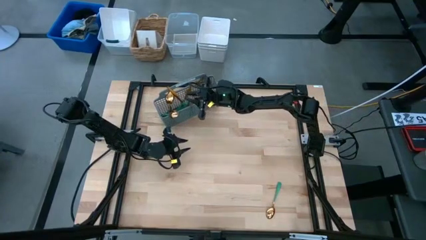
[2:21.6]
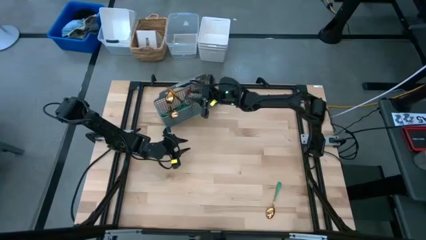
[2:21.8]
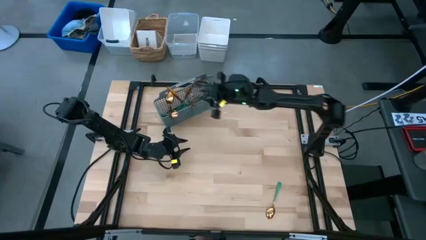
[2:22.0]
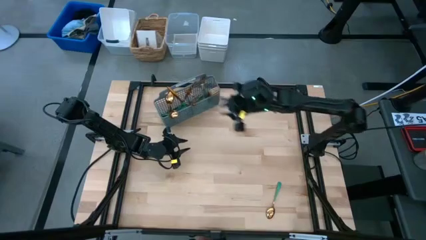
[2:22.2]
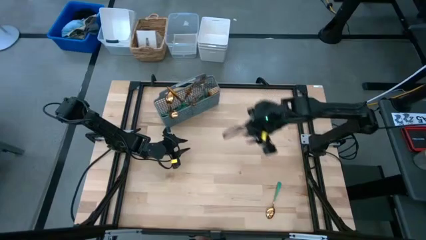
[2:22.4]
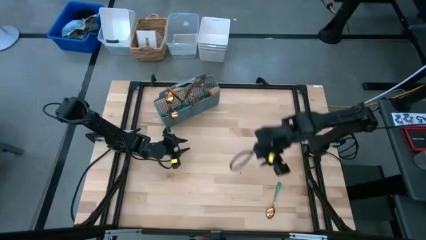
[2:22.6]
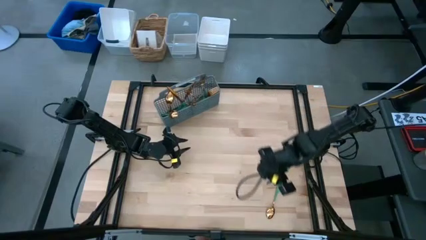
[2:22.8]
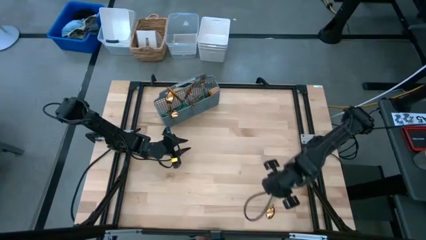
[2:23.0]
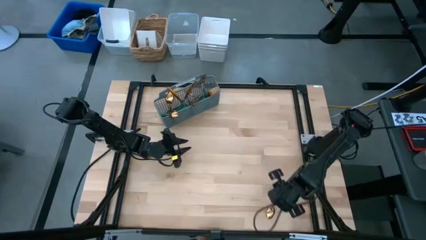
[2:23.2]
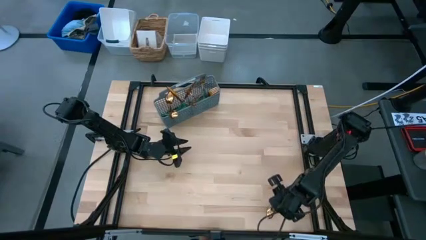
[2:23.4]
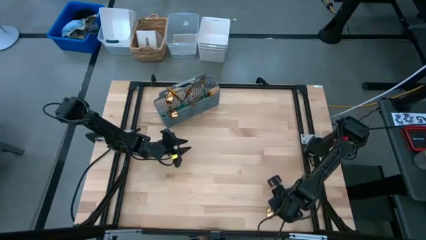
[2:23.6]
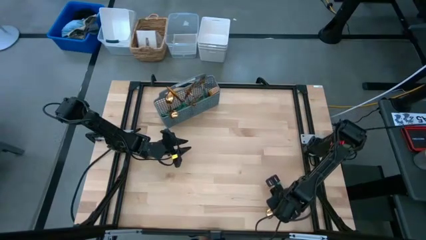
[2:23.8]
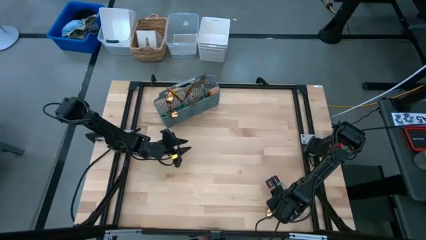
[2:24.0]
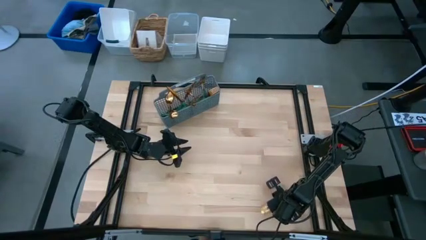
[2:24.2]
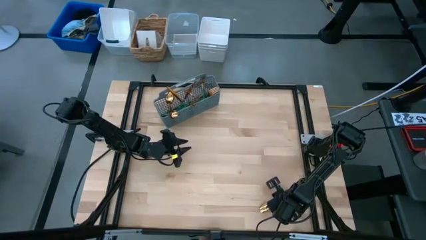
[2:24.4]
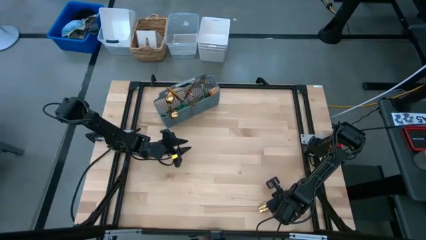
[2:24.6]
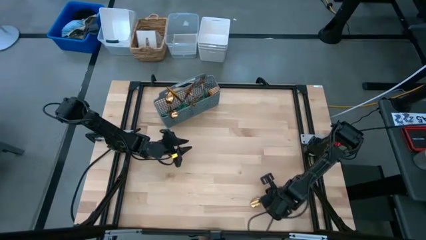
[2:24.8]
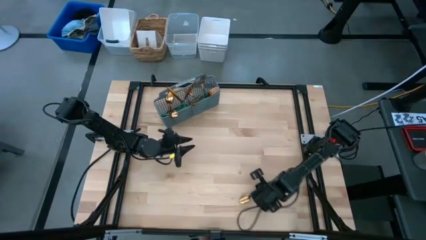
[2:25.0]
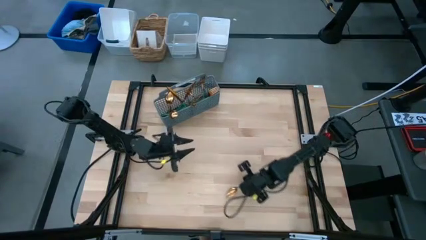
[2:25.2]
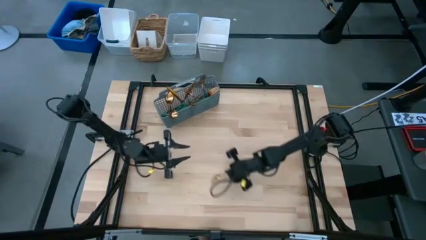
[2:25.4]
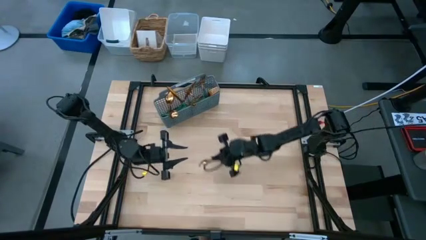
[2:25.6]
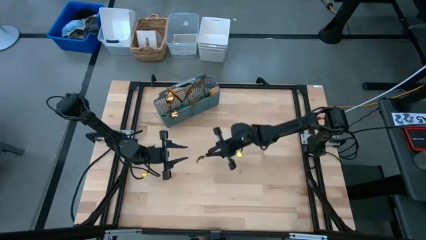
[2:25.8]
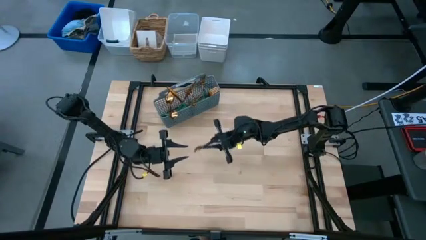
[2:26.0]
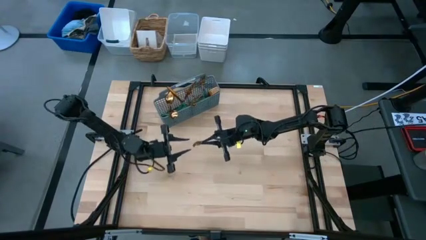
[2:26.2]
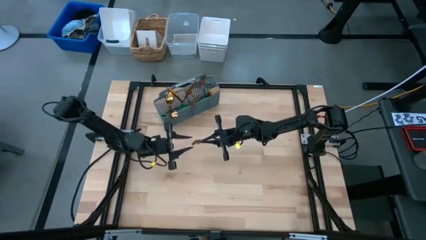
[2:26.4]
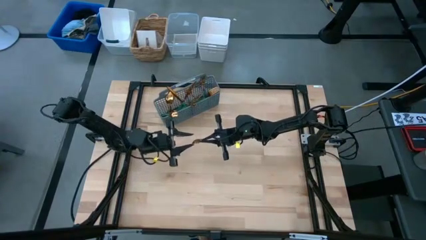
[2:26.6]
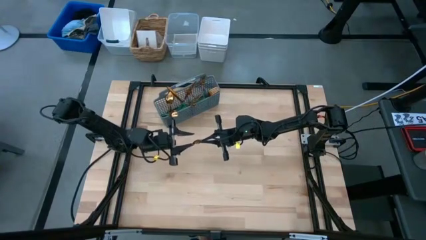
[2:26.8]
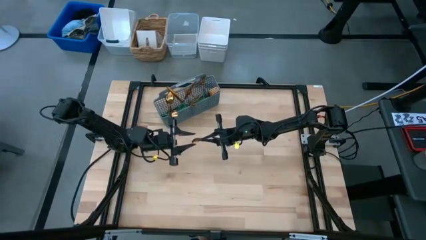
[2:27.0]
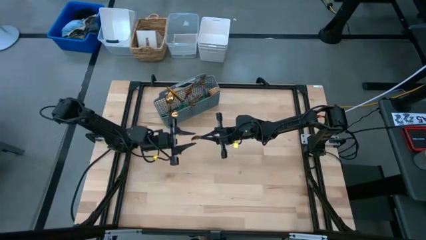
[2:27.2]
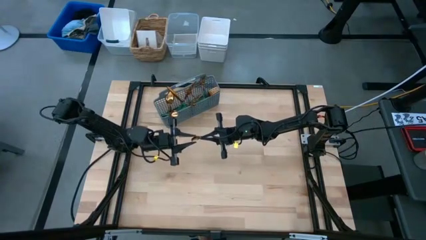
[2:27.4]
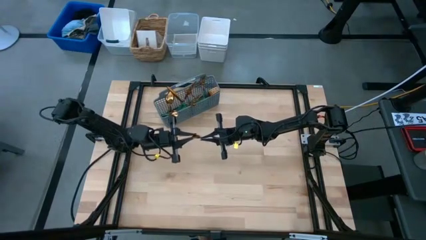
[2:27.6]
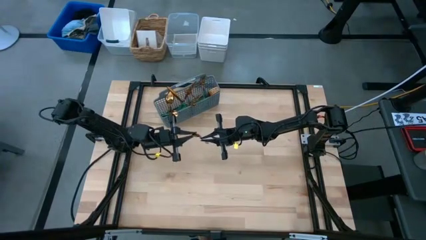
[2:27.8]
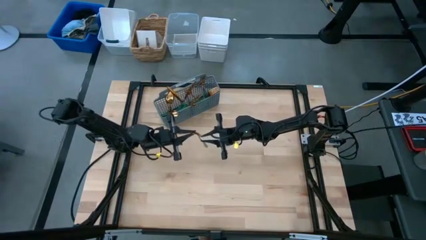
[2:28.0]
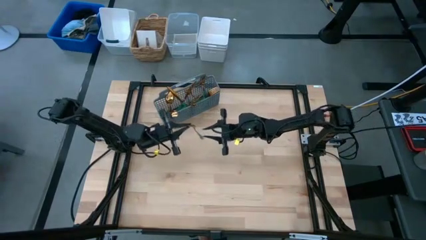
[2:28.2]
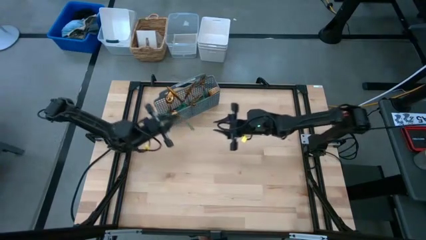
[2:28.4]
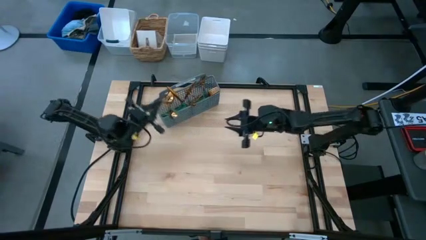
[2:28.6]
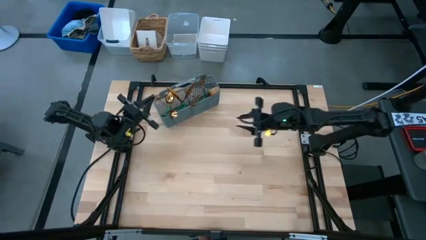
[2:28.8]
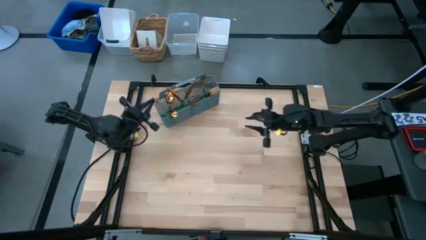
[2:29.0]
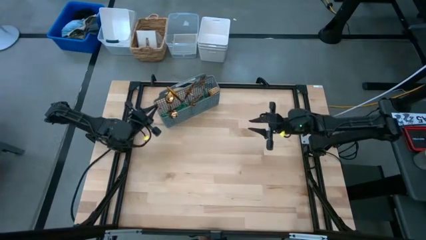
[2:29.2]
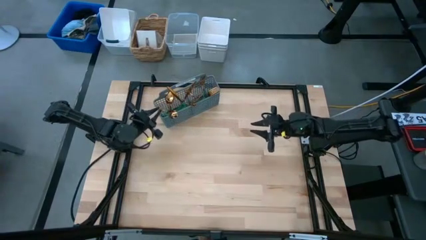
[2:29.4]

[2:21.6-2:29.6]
Task: Sort silverware
Put the spoon into the left section of the silverware holder

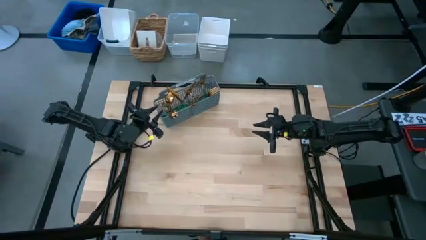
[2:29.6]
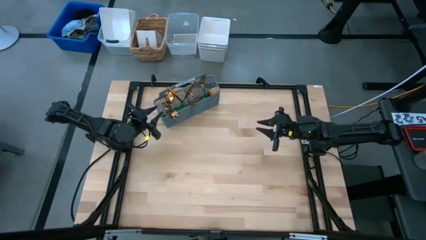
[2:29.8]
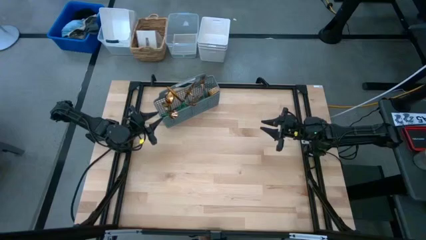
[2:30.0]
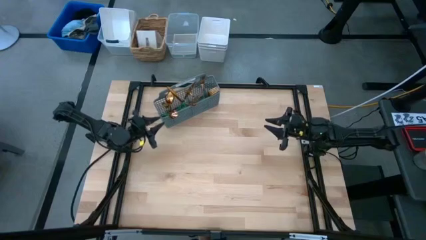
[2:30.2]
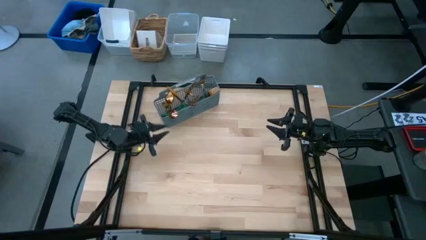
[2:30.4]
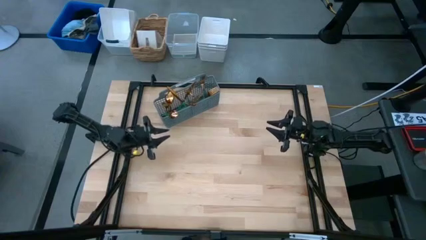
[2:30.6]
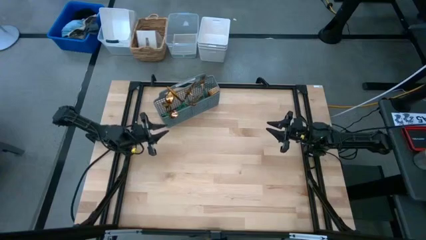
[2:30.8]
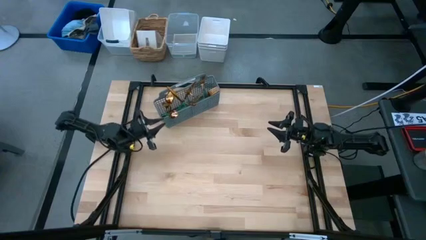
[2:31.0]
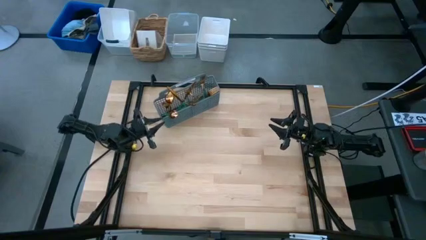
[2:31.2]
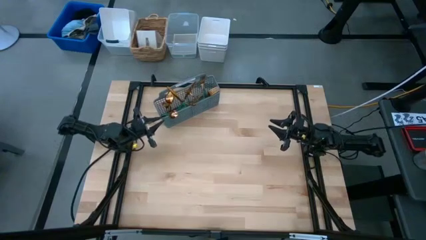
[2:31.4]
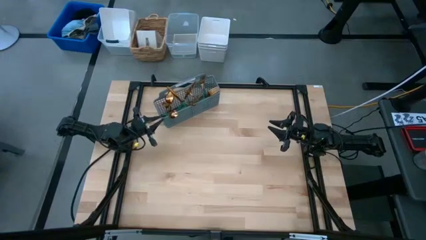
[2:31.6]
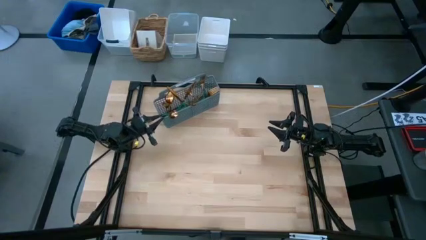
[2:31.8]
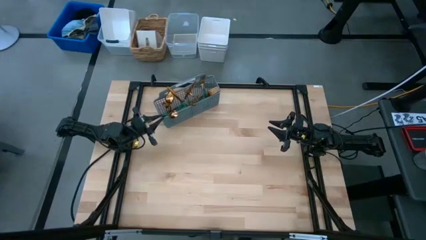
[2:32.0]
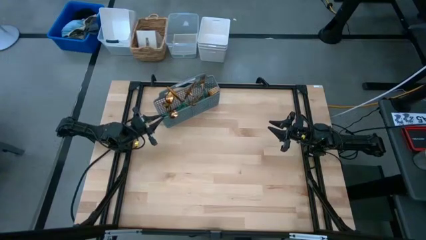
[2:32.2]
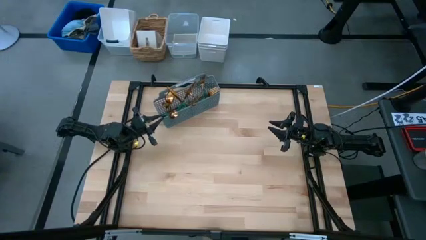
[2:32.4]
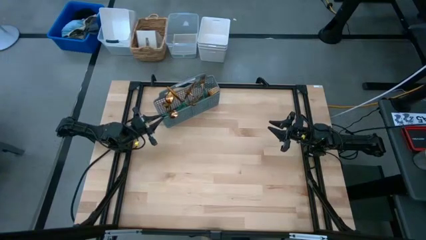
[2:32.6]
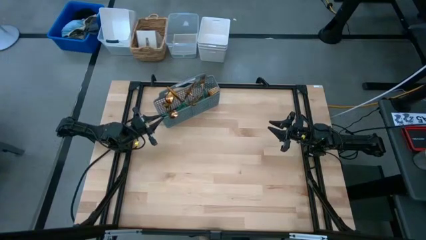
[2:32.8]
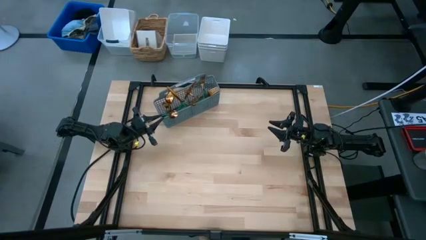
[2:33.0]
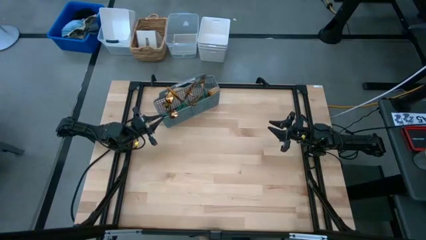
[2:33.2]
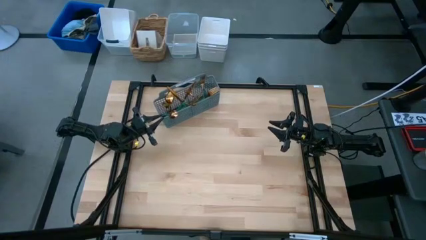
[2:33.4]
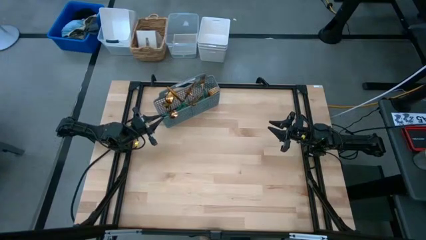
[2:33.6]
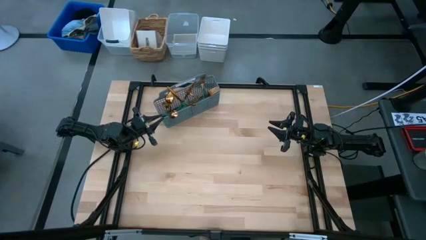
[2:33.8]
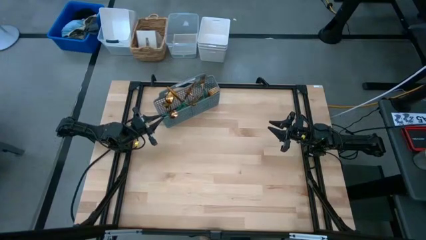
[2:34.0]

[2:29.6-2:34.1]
Return to Home Position

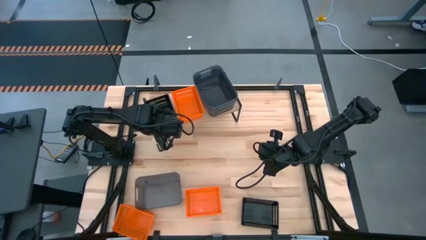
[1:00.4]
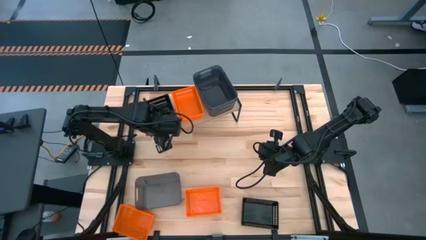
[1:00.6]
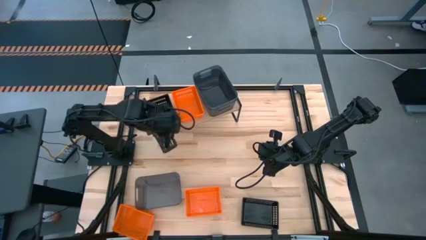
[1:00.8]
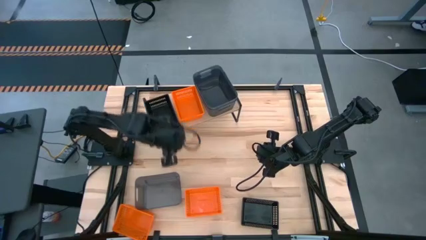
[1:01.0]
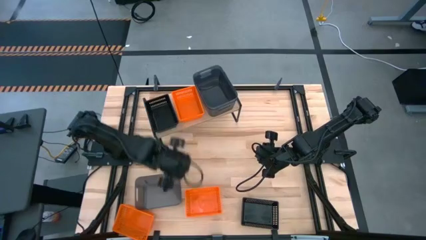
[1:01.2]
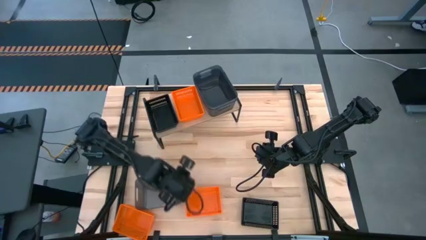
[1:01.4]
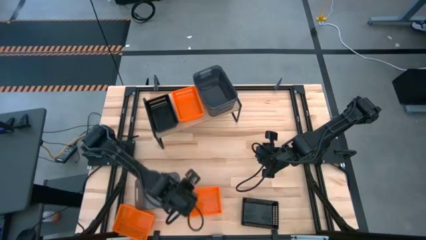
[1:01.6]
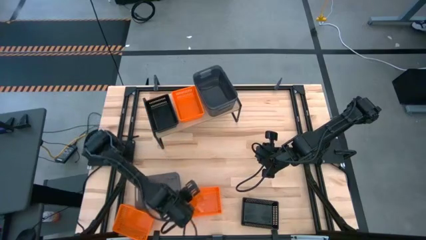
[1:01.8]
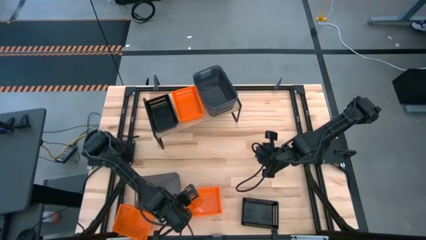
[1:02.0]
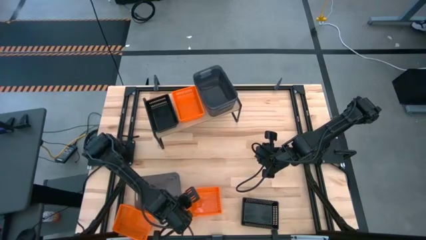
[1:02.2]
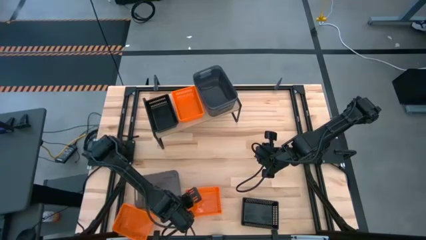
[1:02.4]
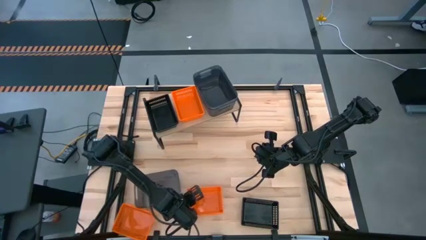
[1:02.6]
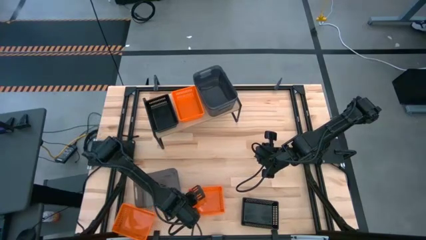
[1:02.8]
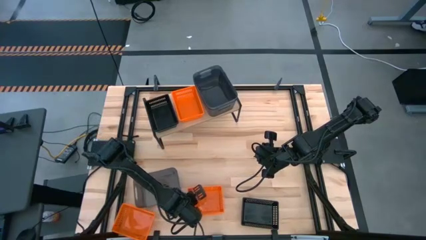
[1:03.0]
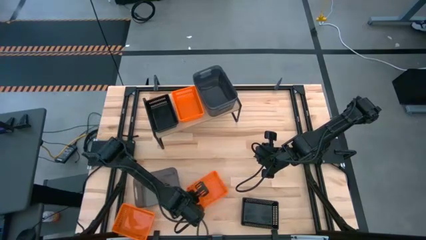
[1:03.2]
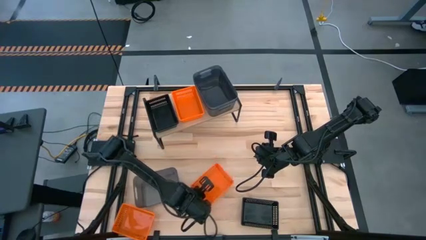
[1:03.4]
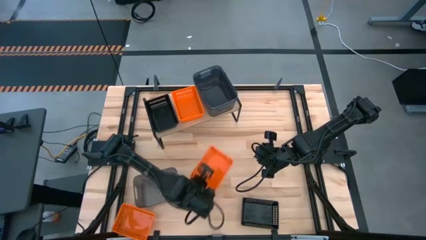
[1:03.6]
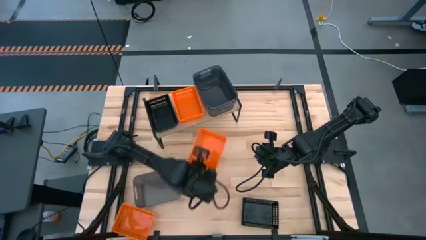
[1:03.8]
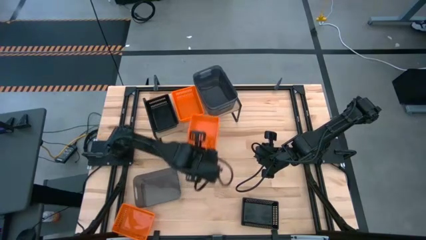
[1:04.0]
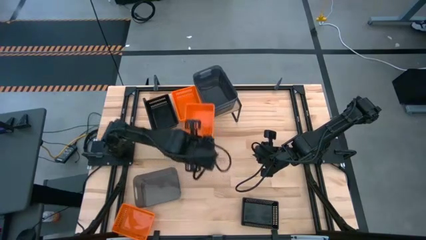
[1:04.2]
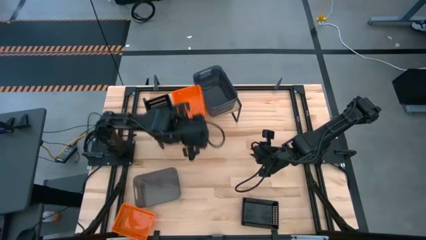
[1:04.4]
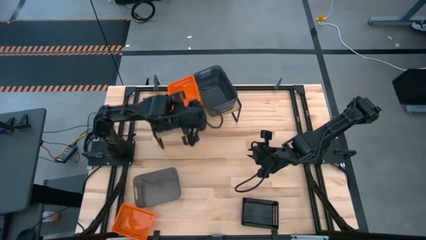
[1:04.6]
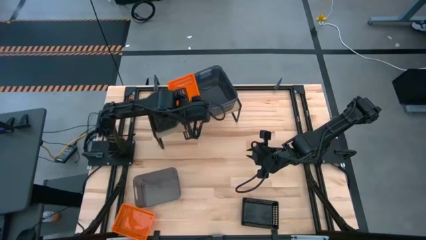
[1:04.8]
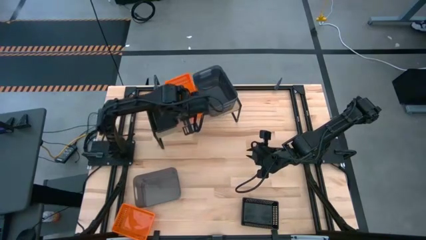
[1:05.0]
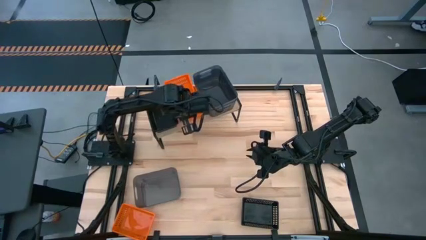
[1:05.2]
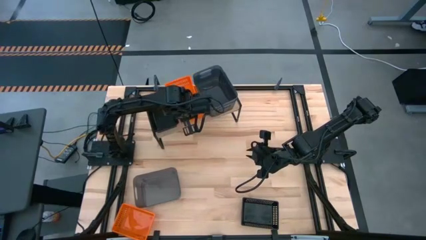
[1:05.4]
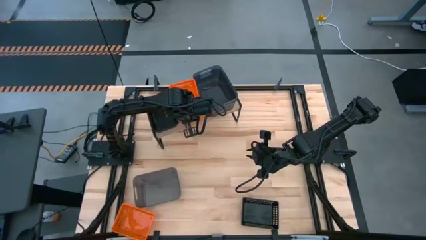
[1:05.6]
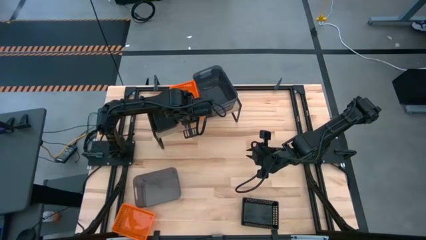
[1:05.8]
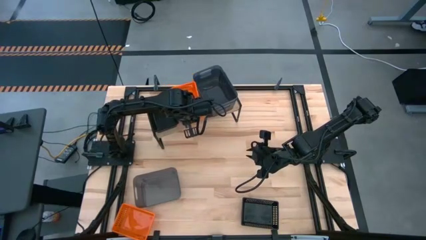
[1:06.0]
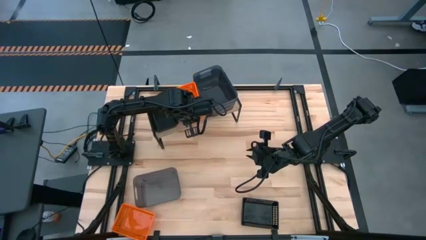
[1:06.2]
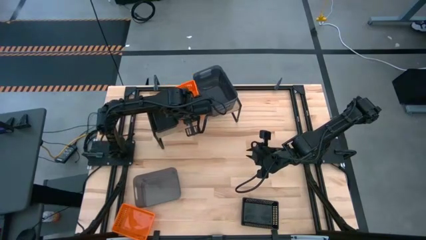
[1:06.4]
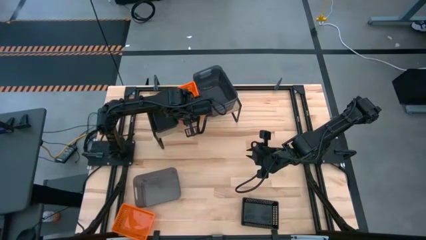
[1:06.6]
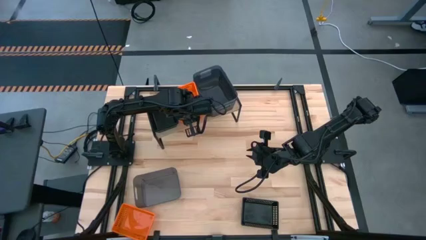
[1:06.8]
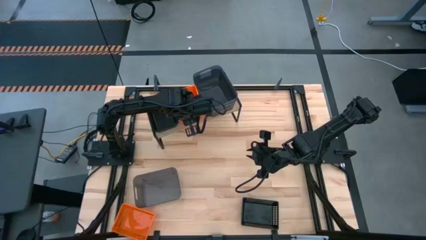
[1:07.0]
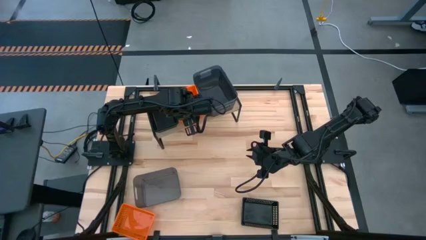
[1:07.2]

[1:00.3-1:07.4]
Task: Stack baskets on shelf by color
Stack the right orange bin on top of the other orange bin on the shelf
